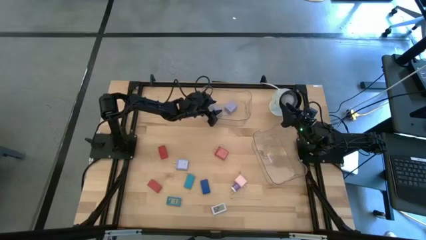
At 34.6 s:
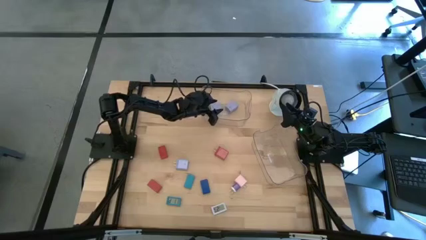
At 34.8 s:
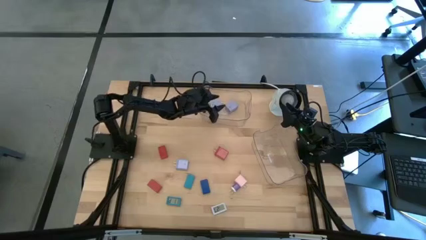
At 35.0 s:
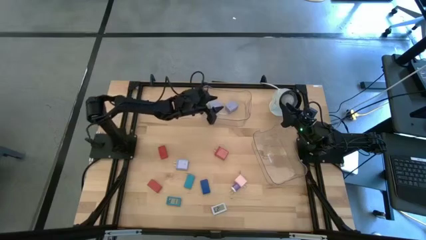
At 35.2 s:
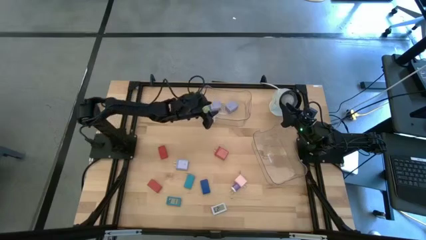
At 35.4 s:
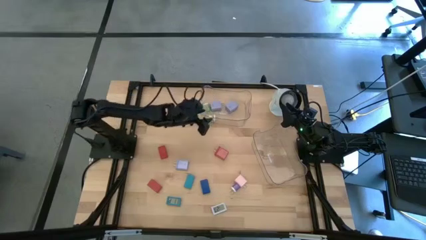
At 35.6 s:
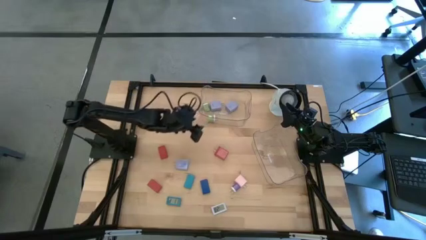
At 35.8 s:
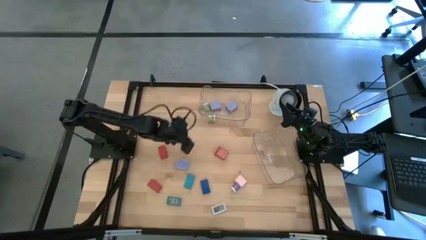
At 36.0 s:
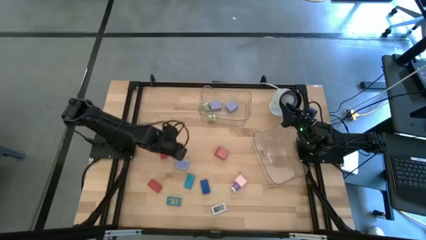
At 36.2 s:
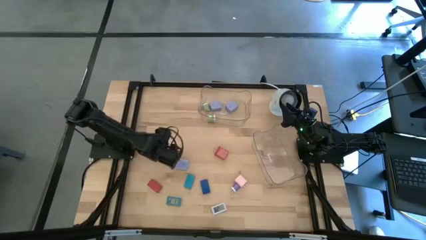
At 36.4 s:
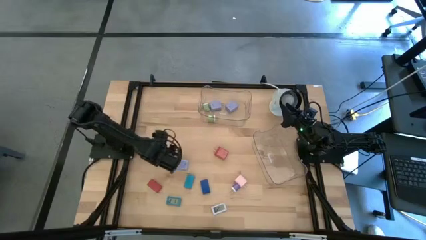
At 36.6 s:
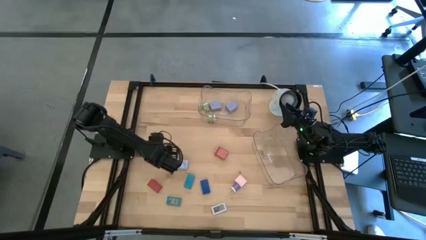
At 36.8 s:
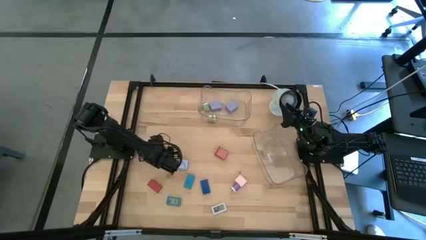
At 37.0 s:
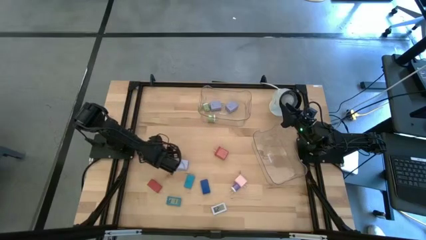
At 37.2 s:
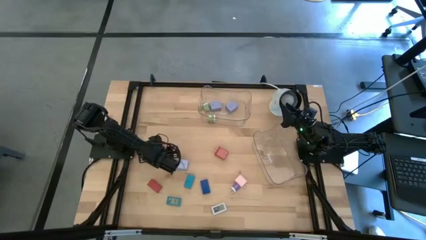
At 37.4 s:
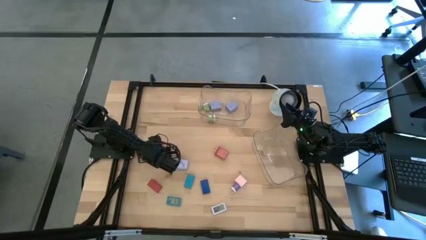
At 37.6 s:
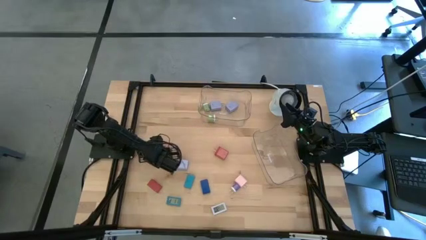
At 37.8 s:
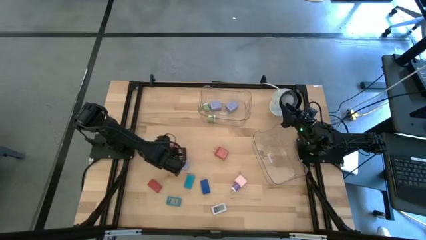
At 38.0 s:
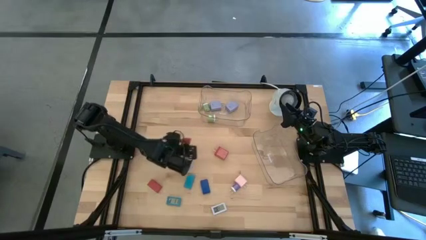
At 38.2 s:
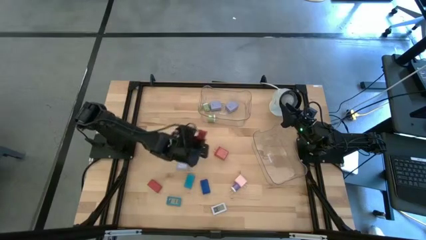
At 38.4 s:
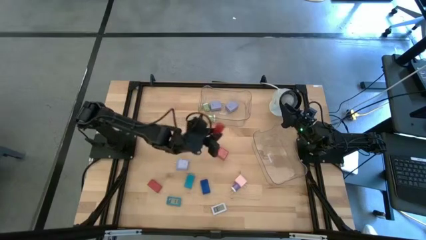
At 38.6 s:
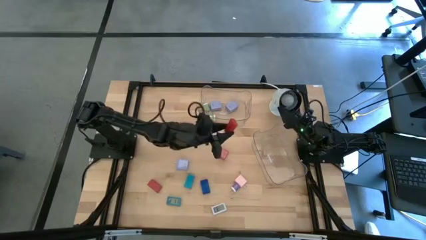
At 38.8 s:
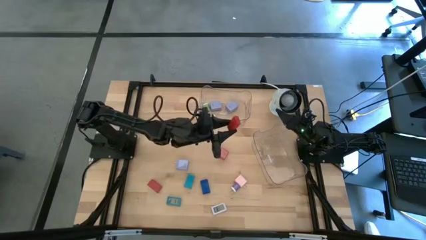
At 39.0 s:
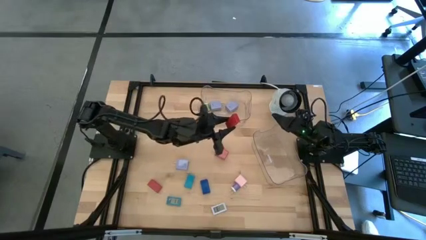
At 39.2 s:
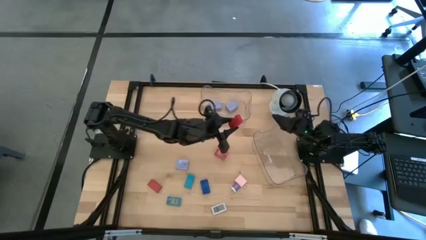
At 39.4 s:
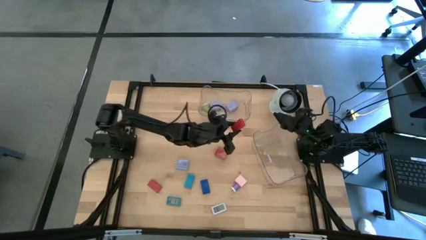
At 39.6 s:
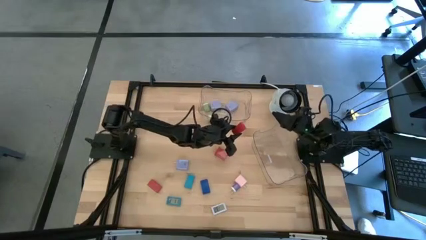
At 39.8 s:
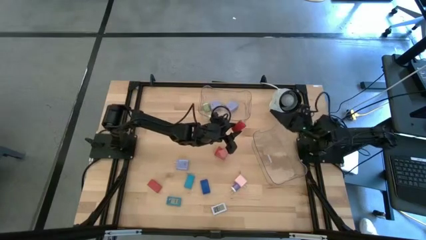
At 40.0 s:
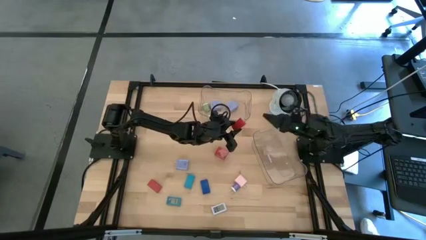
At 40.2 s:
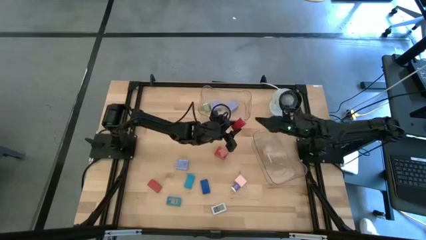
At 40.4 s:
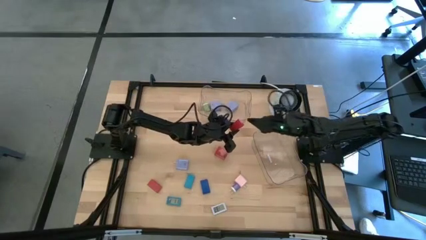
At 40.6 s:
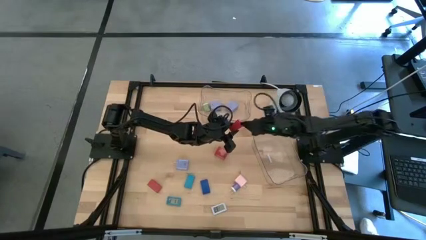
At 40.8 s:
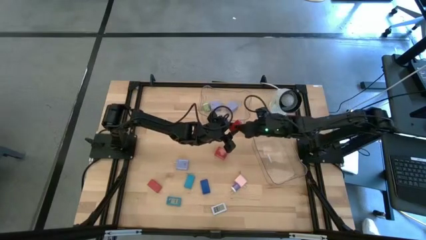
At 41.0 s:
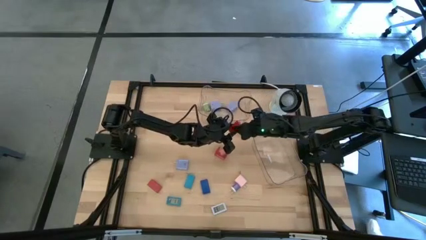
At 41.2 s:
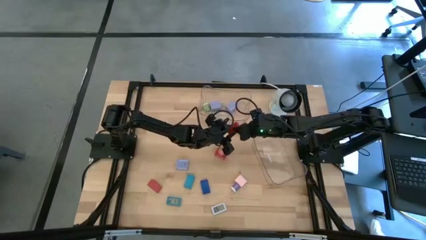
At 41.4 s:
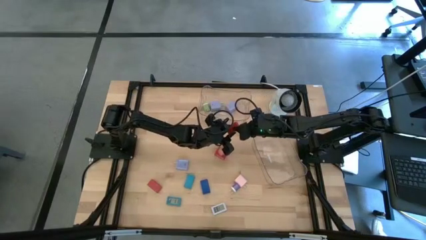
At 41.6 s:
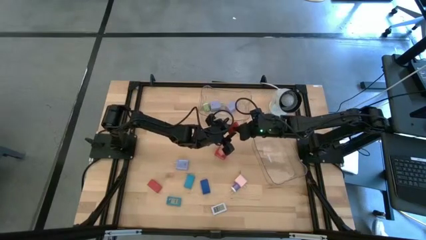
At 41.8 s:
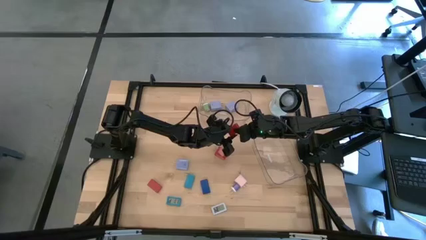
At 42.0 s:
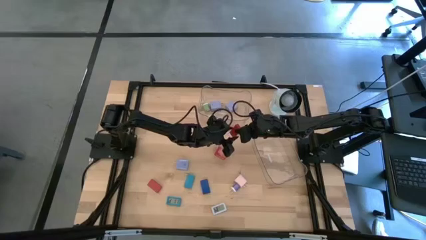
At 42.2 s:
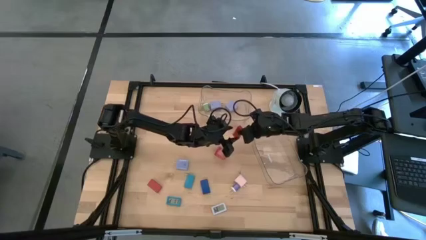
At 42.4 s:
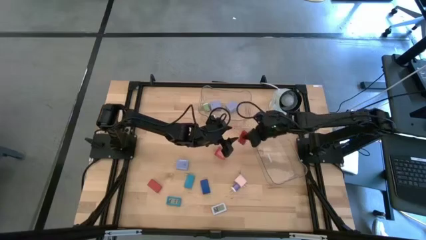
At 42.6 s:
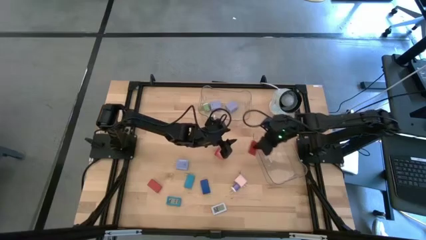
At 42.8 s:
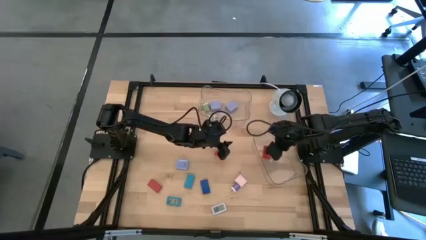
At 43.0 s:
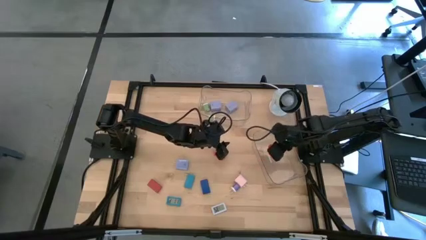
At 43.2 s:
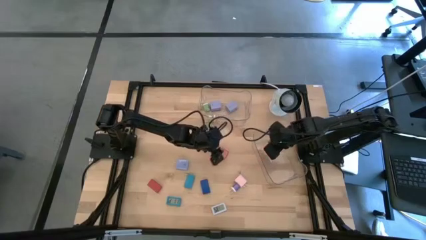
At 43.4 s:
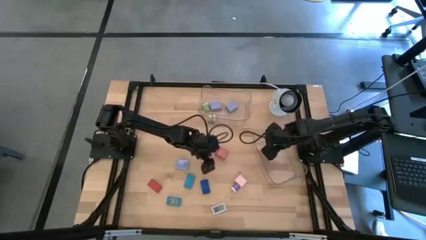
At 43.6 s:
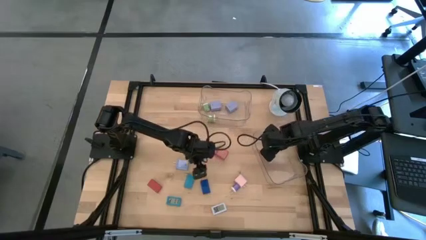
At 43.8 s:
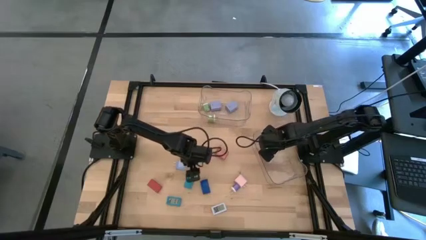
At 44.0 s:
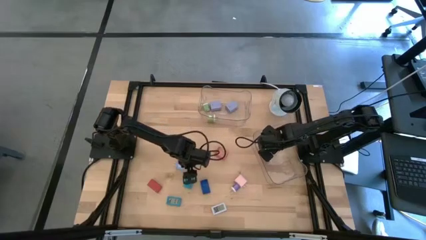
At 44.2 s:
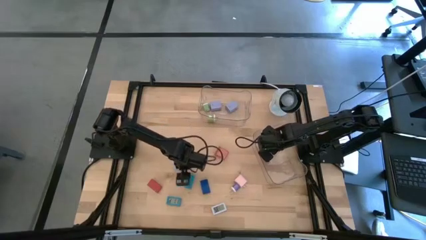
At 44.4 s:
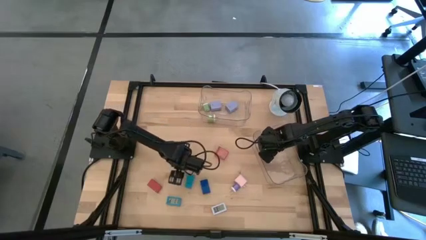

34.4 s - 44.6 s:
Task: Pick & Place Office items
Put the top red digital clock into the bottom transparent bin

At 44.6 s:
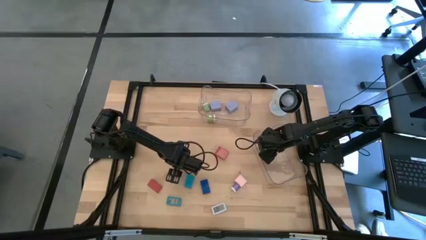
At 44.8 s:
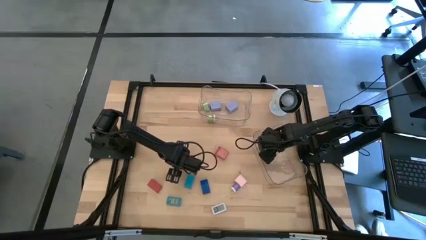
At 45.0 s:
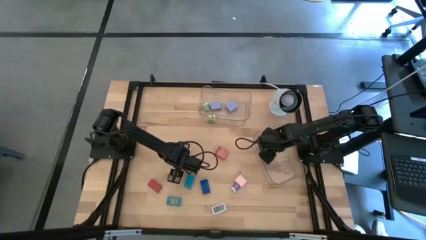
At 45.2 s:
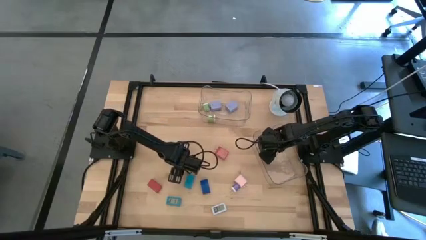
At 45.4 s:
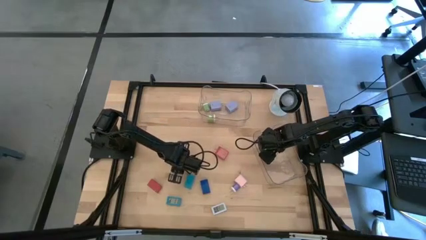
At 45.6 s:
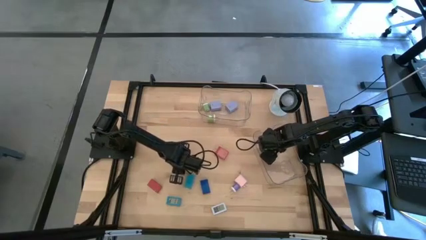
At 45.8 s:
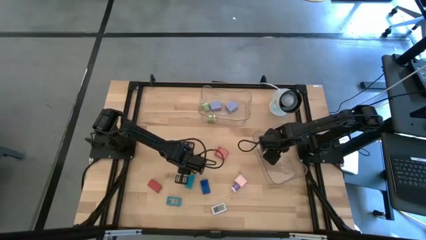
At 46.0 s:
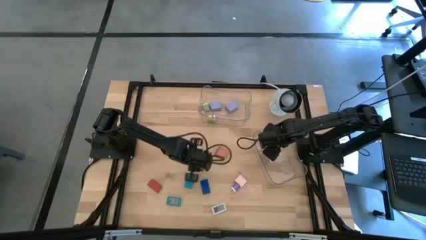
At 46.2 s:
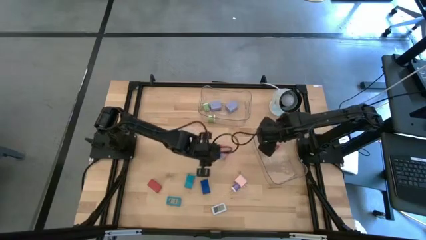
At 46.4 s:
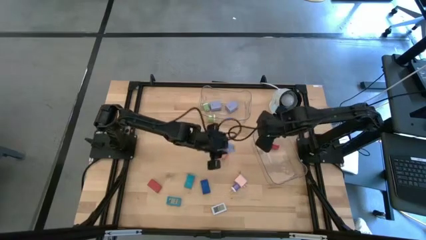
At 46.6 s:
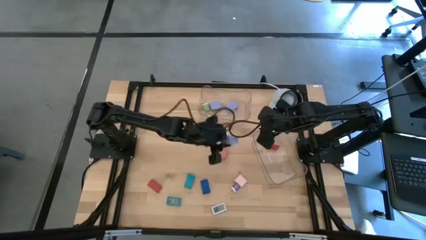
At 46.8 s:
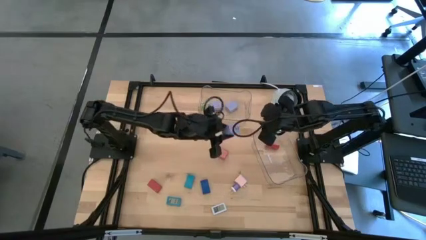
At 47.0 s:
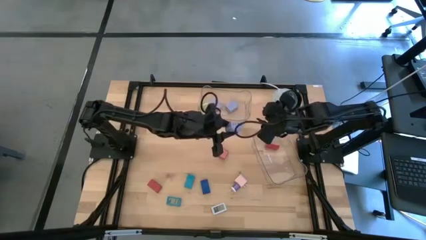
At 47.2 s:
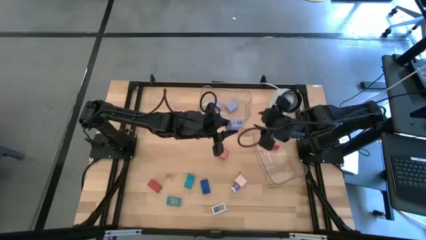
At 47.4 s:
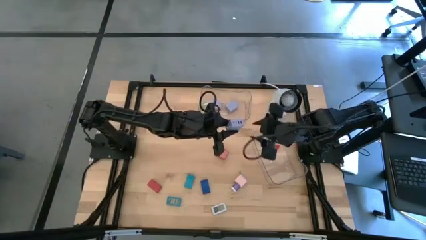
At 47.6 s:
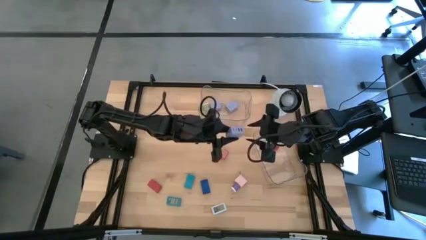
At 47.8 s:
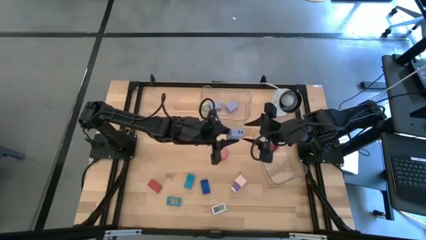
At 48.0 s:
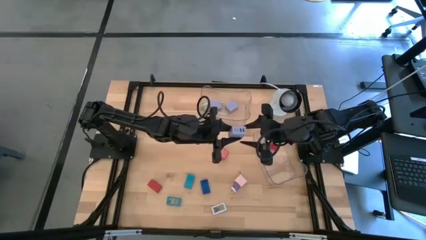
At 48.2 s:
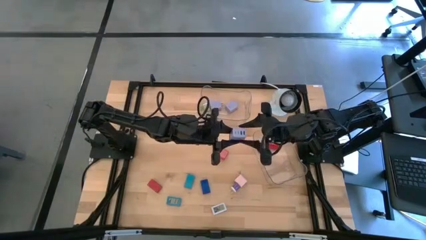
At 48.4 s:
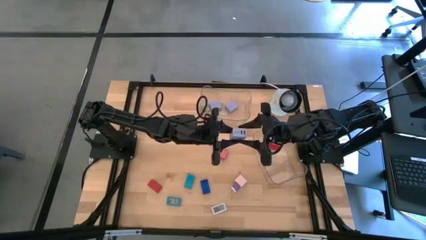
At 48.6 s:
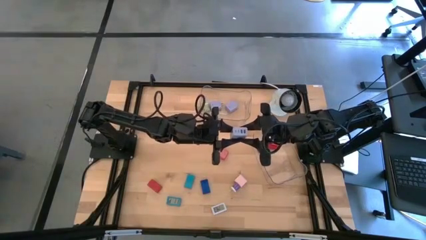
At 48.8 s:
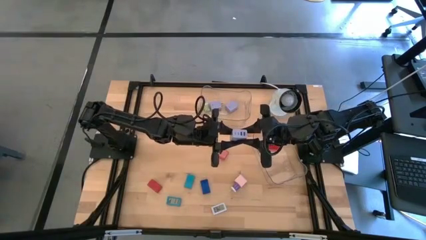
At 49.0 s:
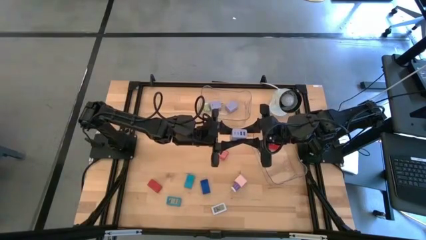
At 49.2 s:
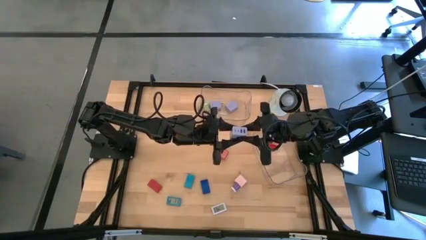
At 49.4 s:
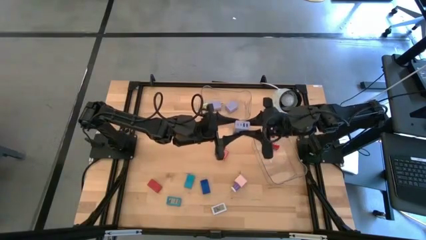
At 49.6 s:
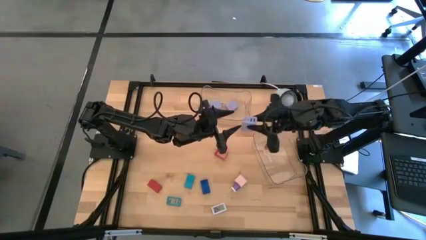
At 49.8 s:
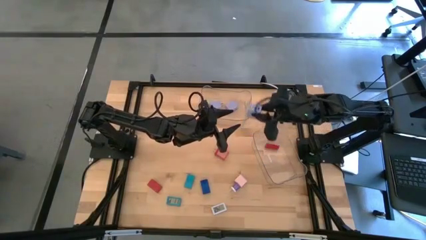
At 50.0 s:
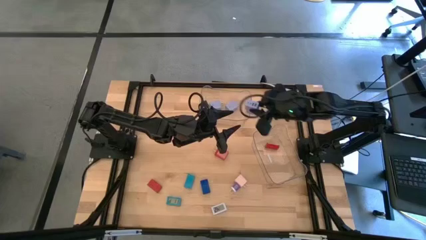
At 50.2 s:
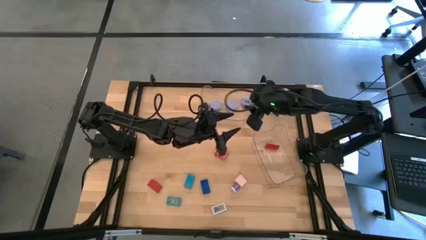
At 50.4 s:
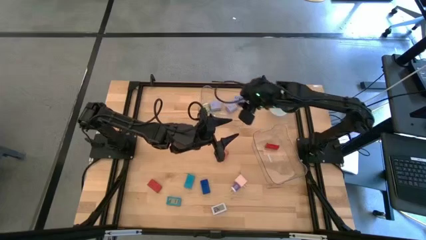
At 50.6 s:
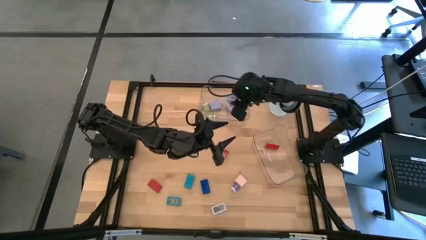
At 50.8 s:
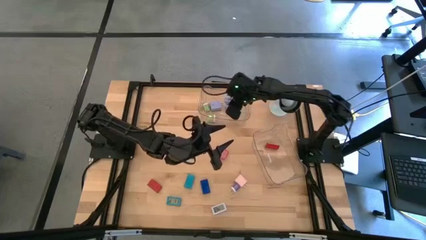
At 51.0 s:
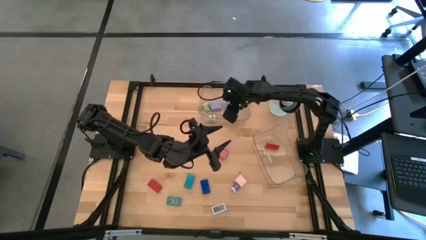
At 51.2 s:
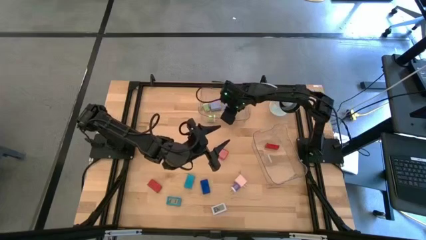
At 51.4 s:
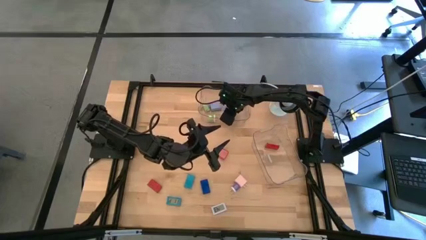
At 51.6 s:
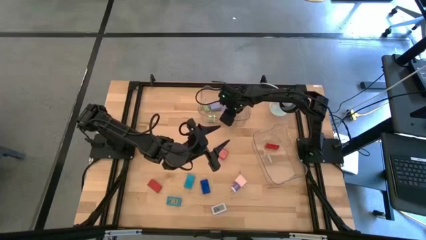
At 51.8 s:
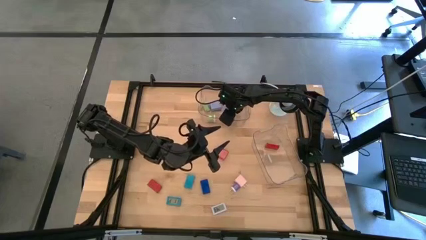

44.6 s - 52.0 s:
Put the large purple charger adapter into the top transparent bin
